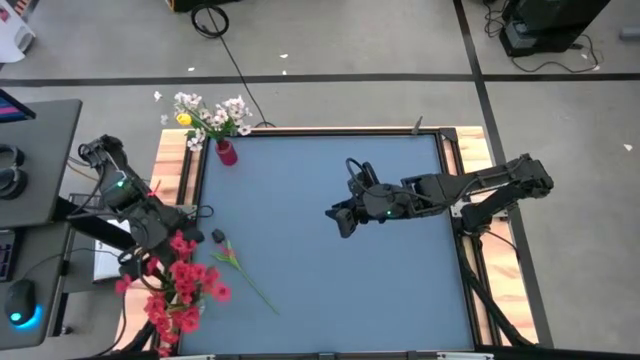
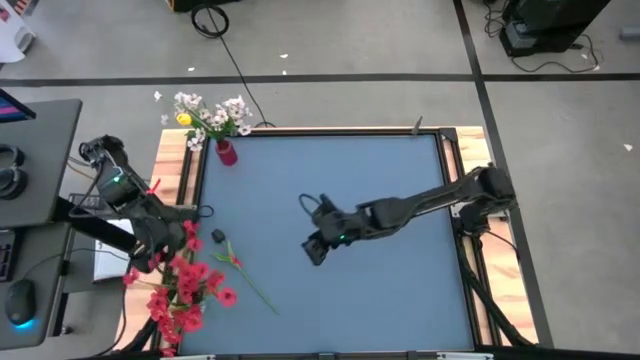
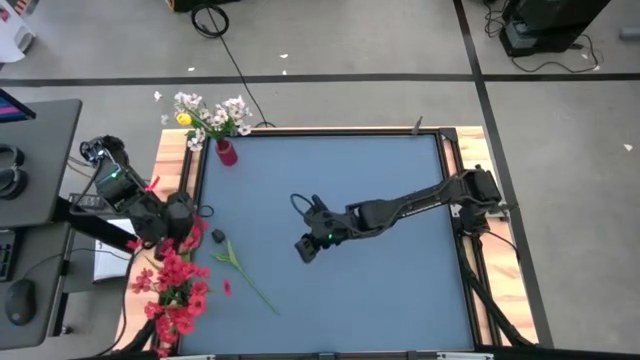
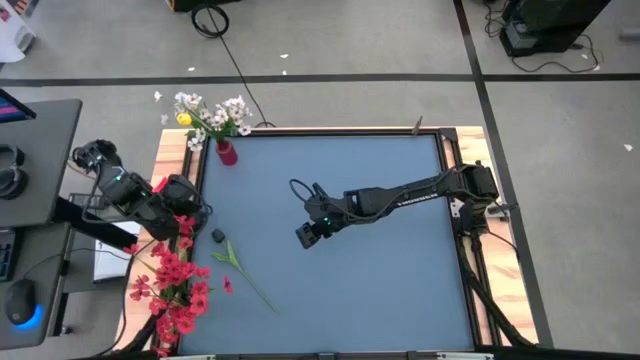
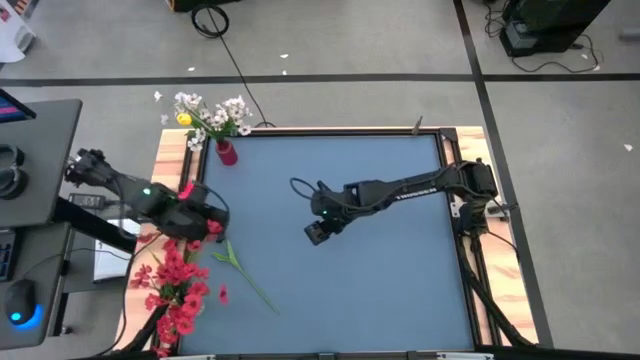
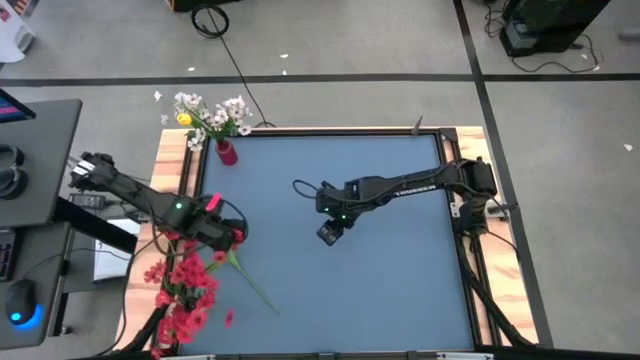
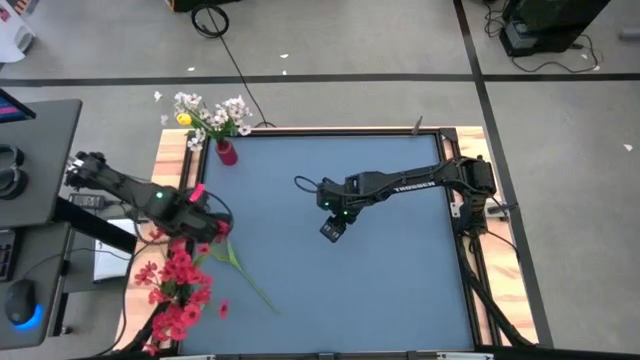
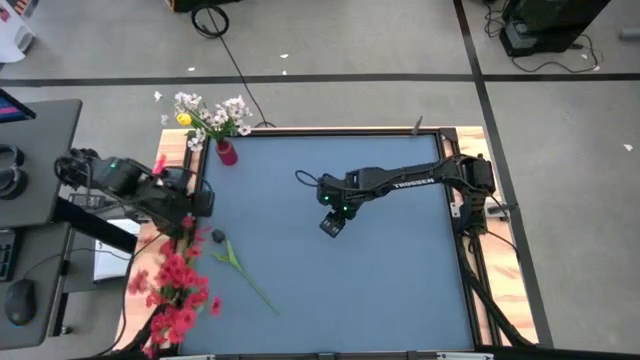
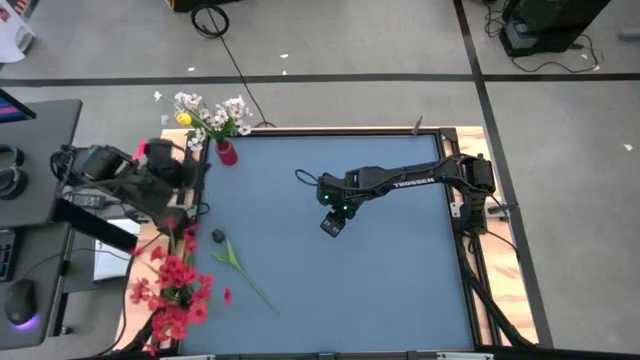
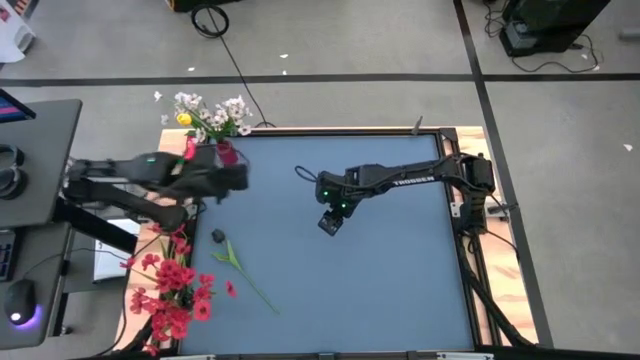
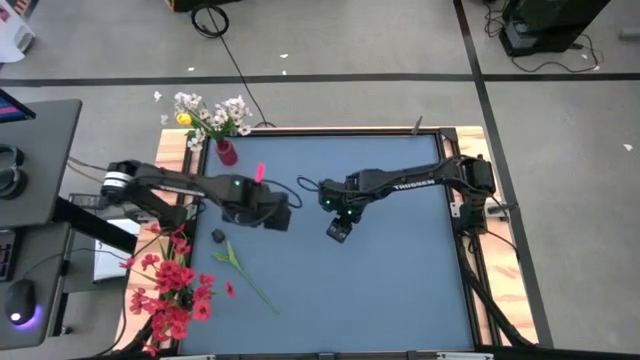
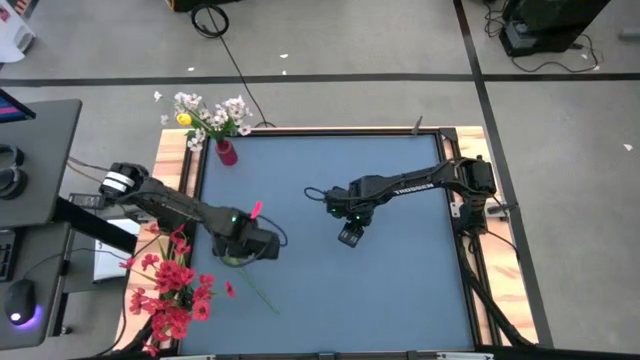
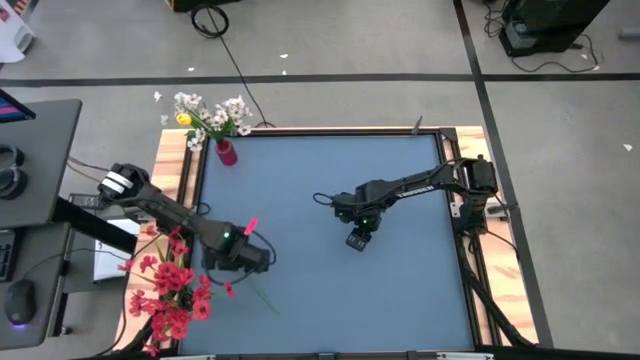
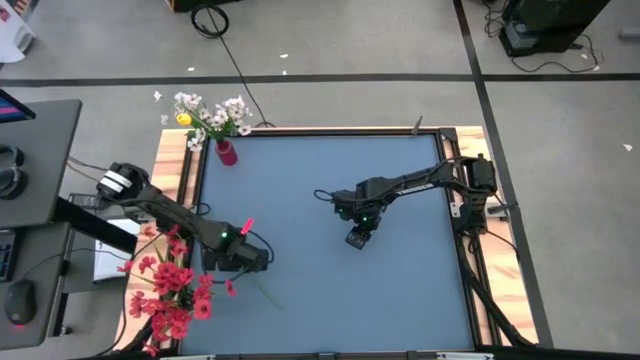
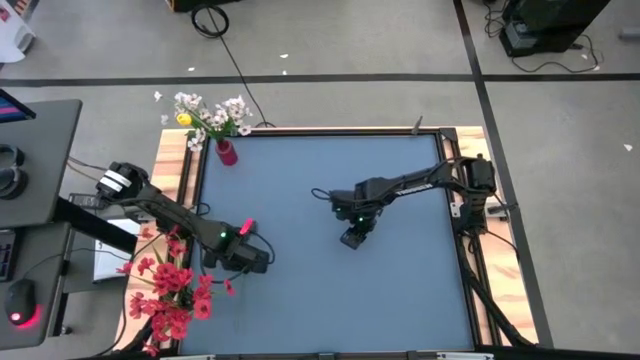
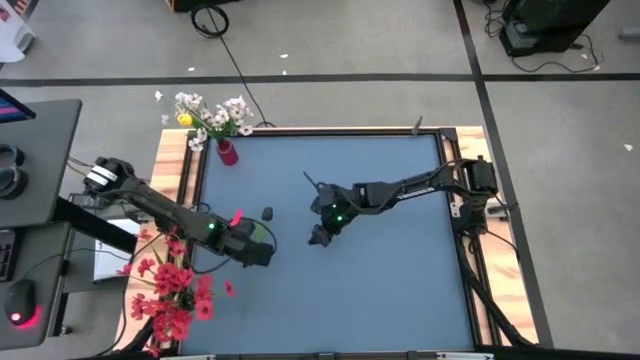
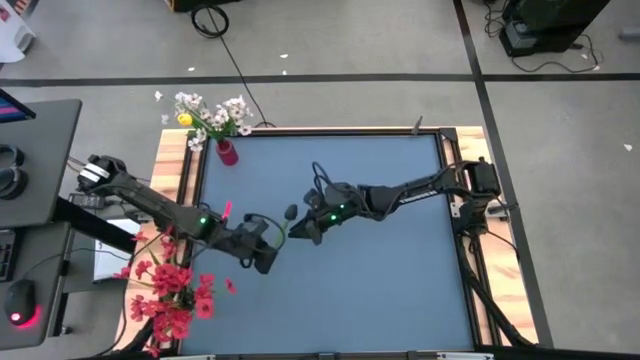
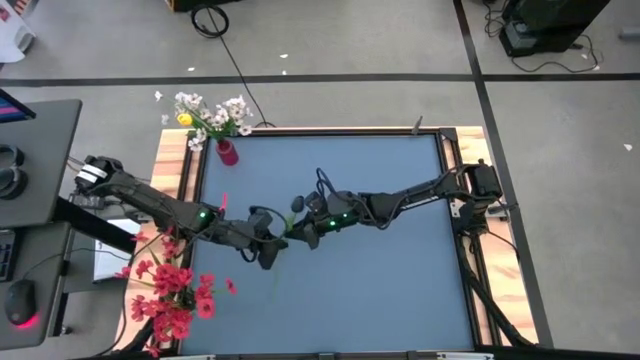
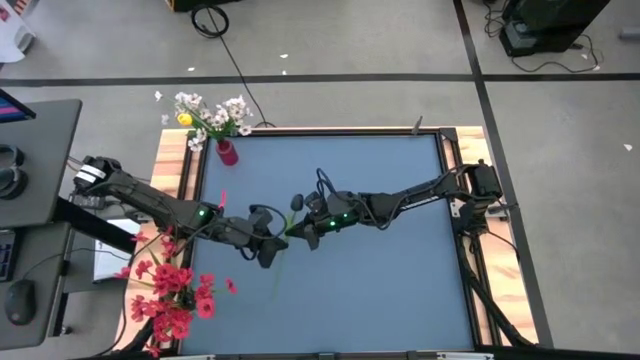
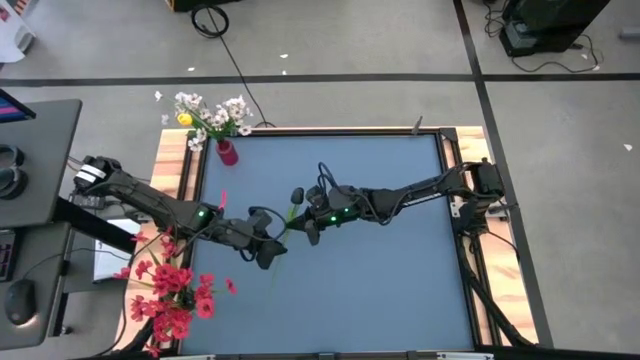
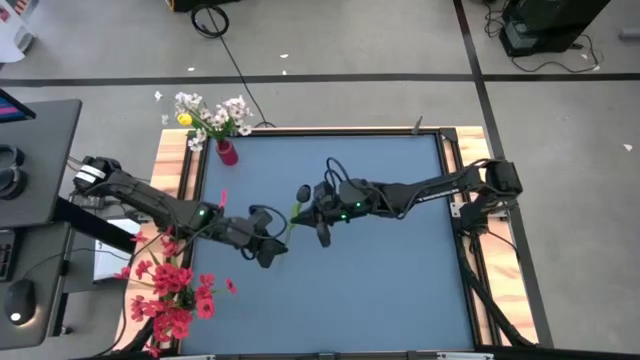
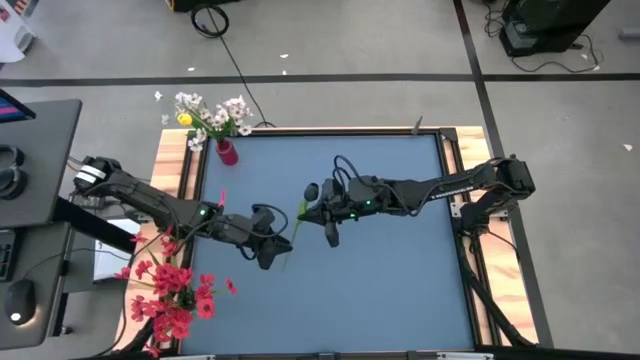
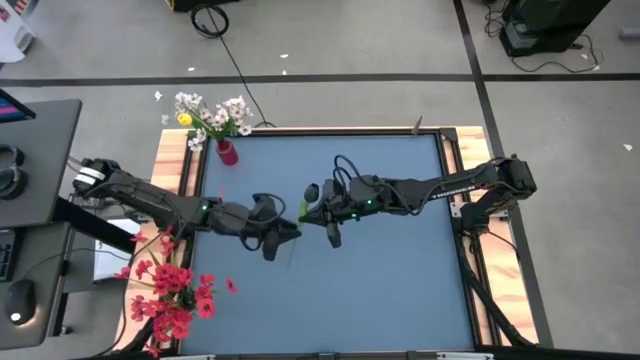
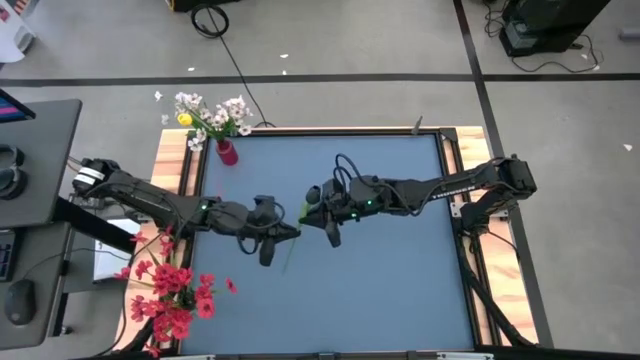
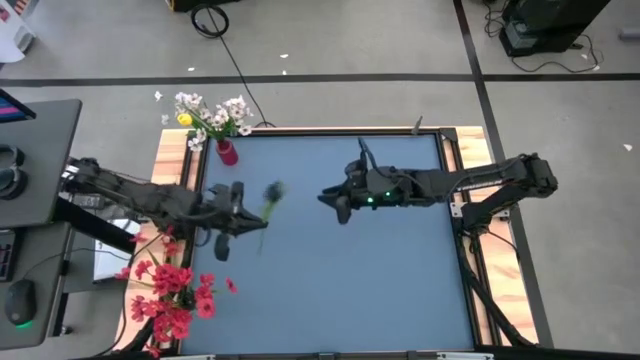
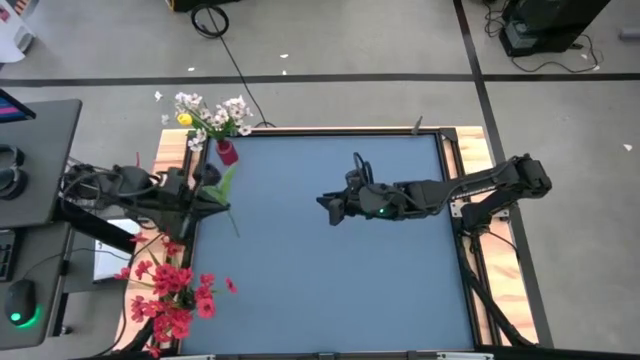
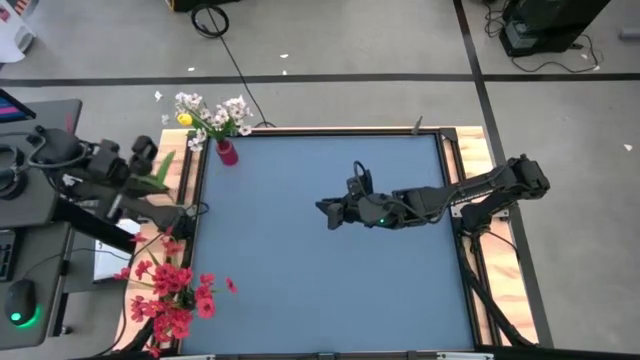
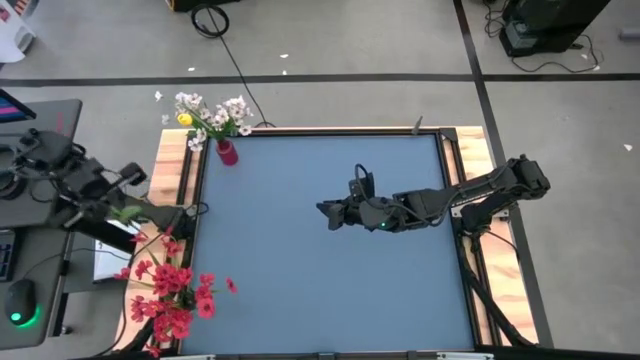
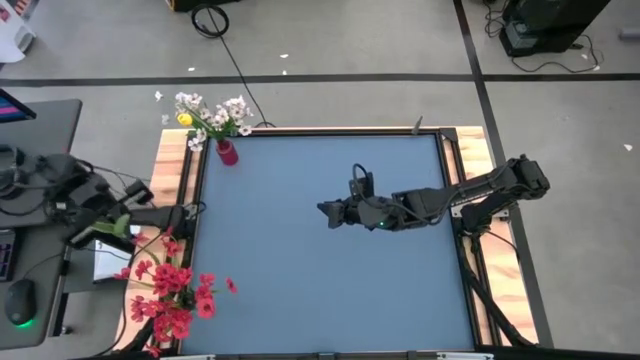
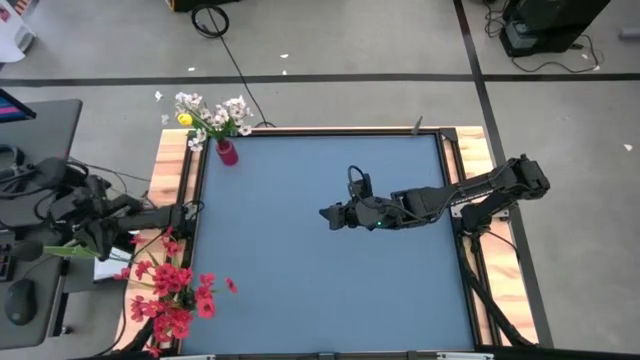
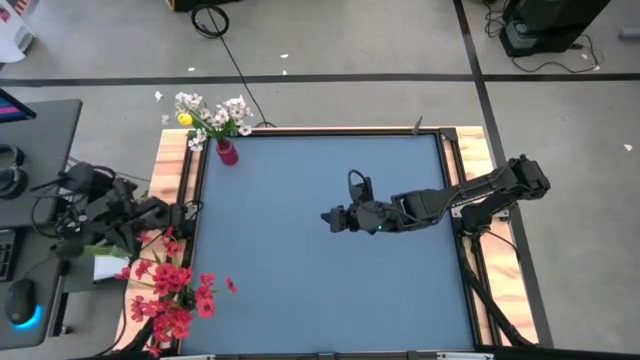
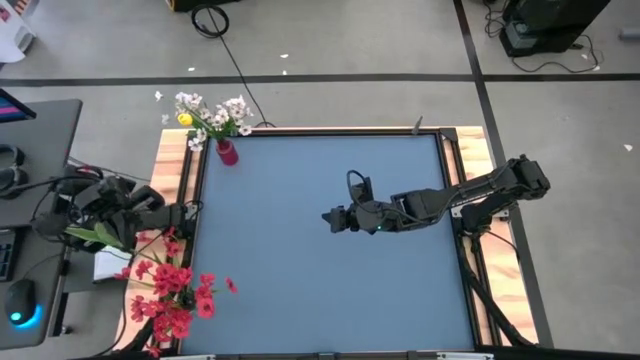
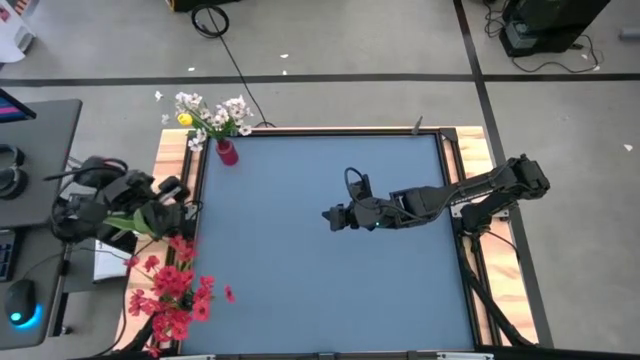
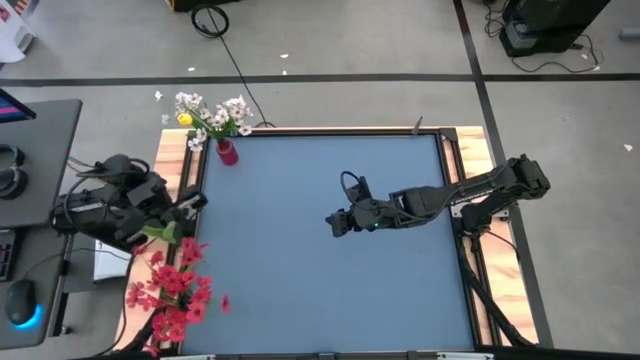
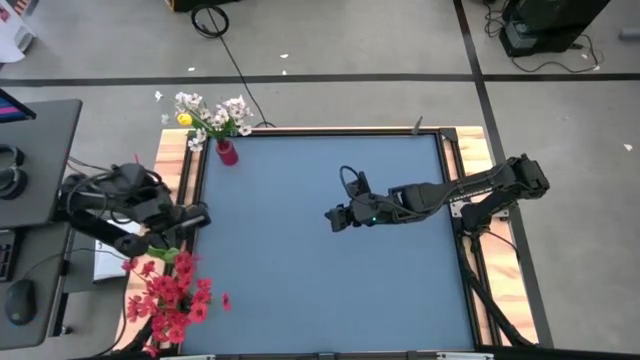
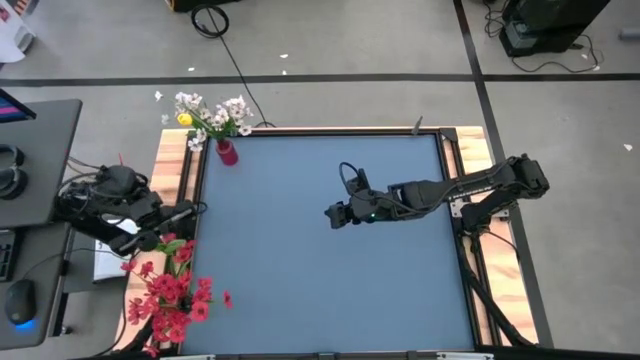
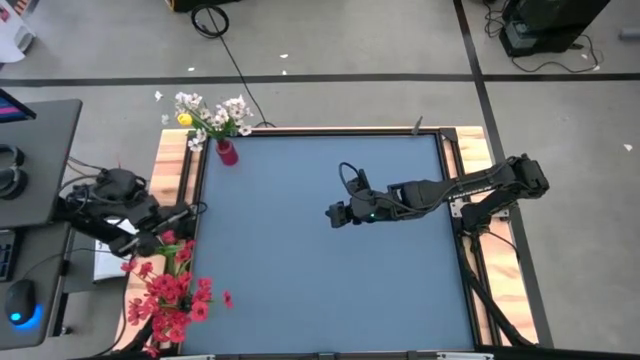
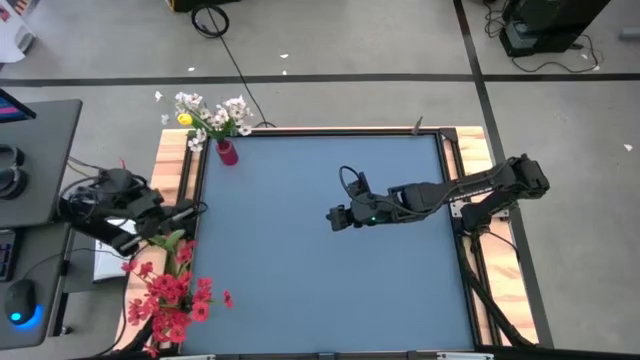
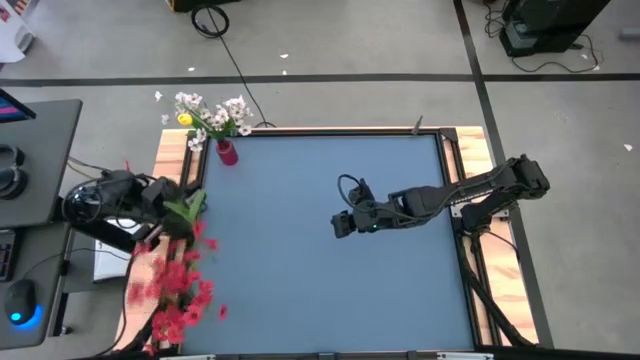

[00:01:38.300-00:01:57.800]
Task: Sort flowers into vase by color
Put the black flower into the transparent vase
